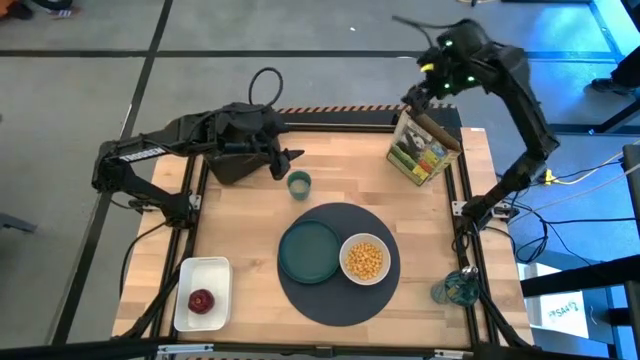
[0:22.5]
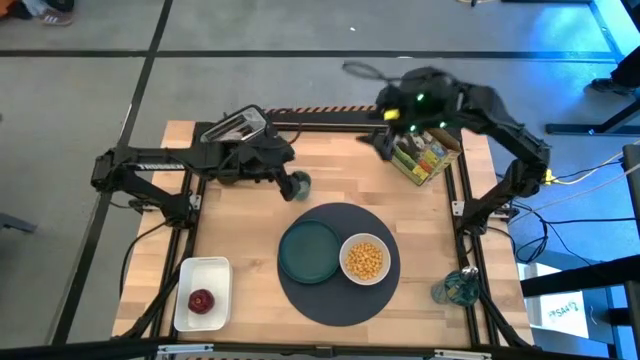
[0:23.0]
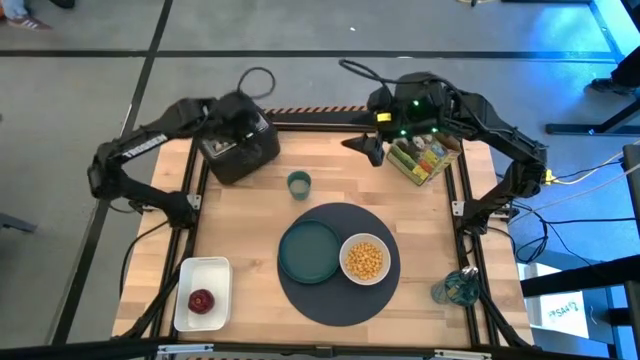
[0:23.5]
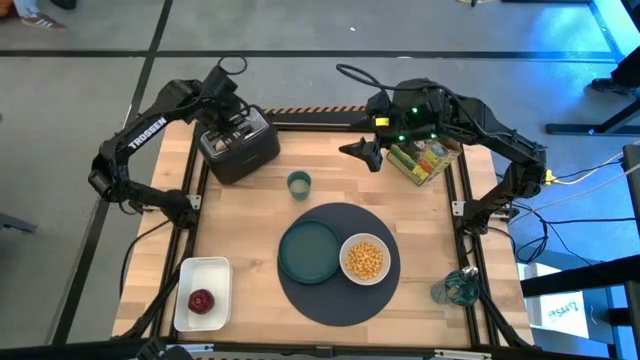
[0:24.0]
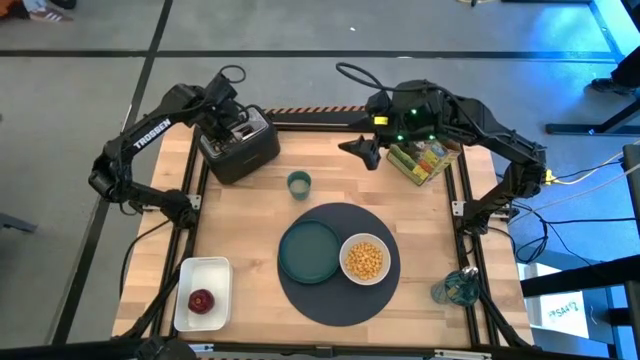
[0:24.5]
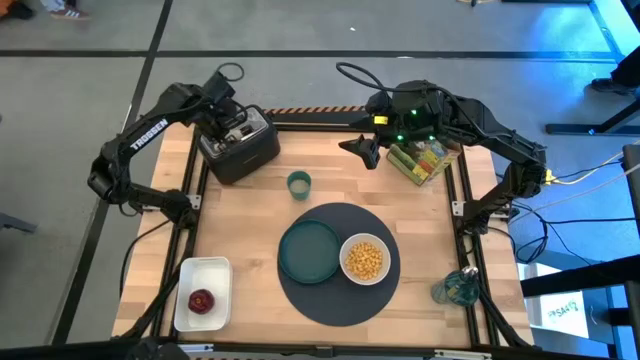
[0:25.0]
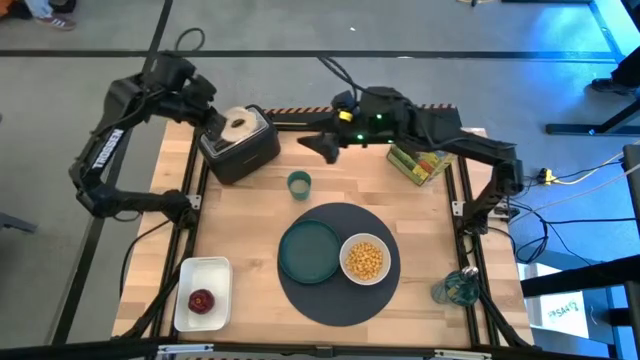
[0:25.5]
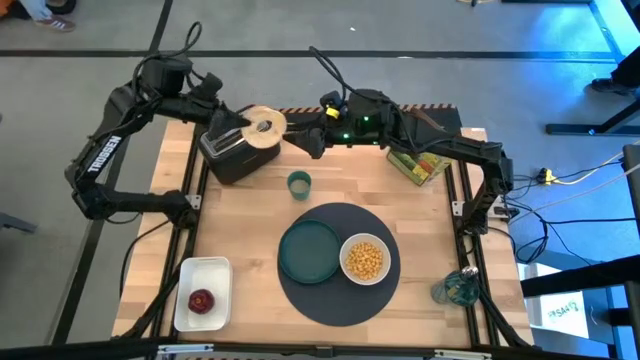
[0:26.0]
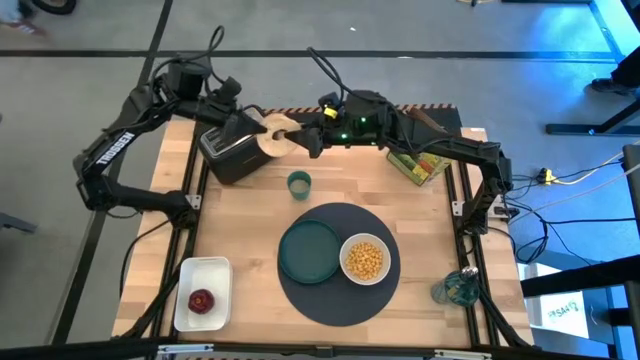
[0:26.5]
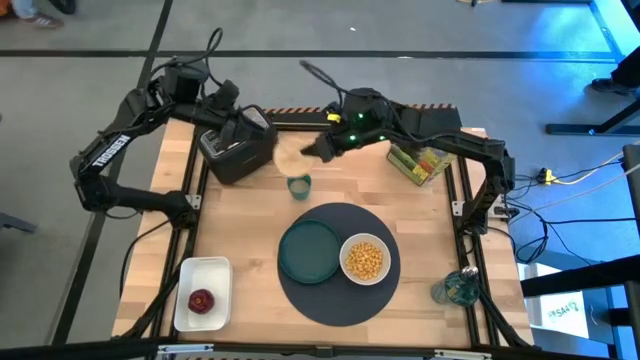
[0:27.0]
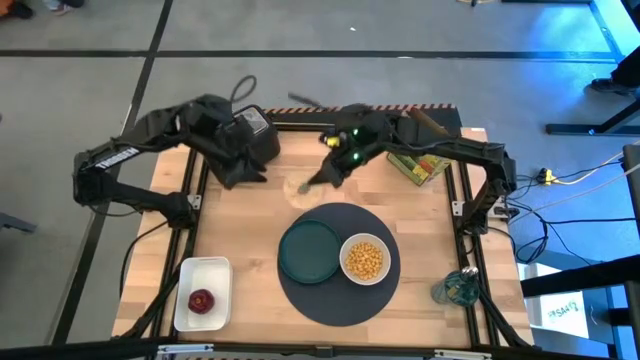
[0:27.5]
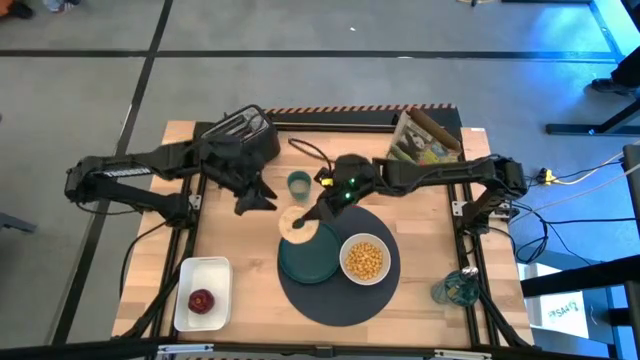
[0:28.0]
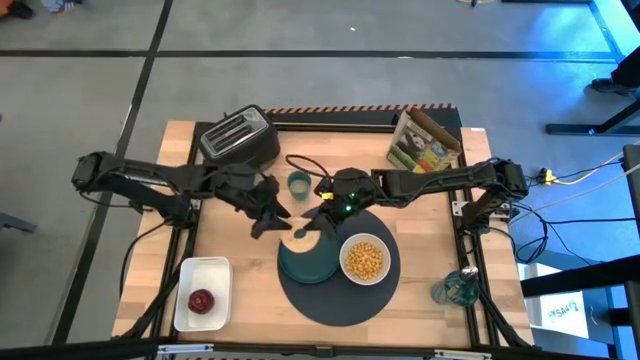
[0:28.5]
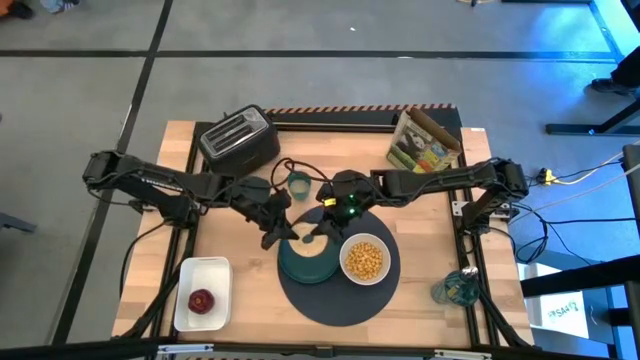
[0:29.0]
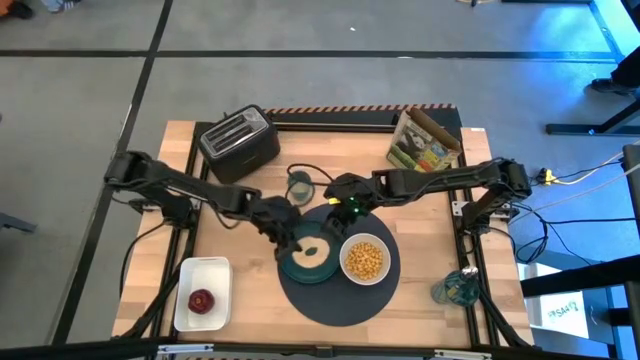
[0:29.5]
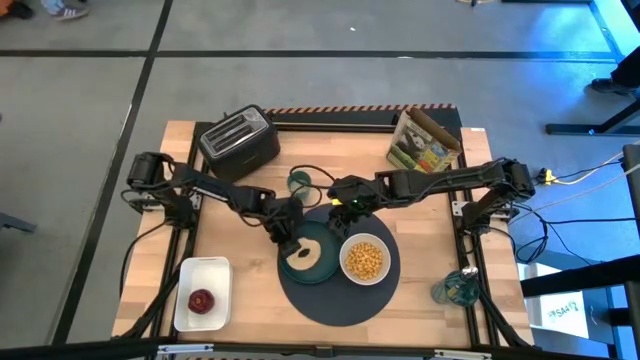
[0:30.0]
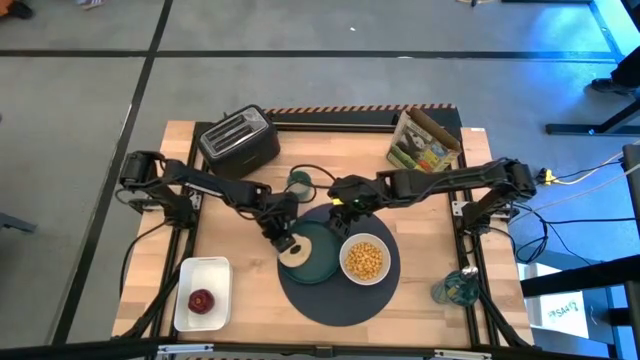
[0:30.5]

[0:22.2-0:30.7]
Task: Arrange a breakfast setting
Put the bagel from the toaster onto the green plate

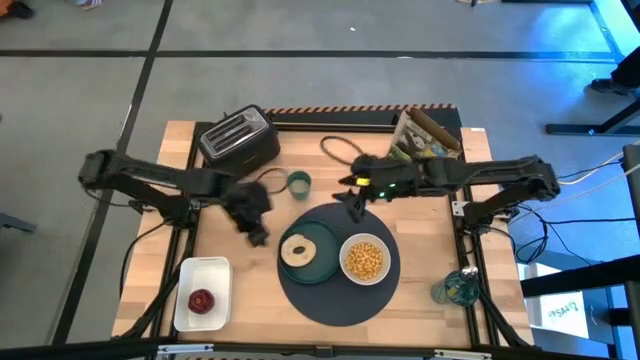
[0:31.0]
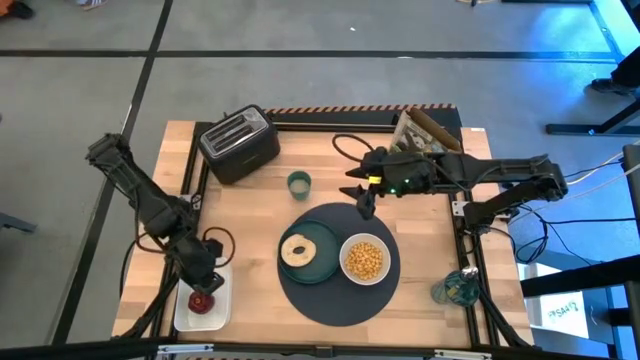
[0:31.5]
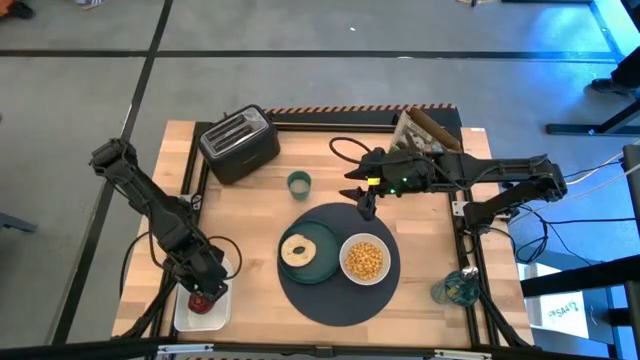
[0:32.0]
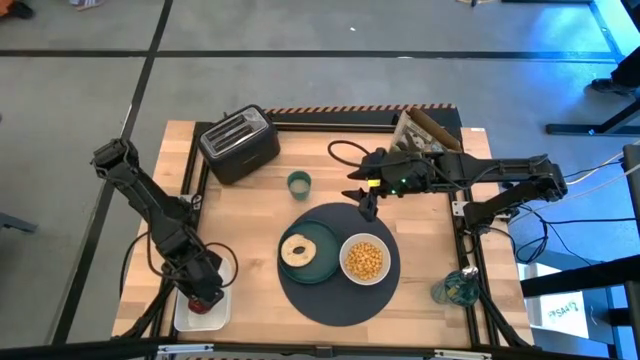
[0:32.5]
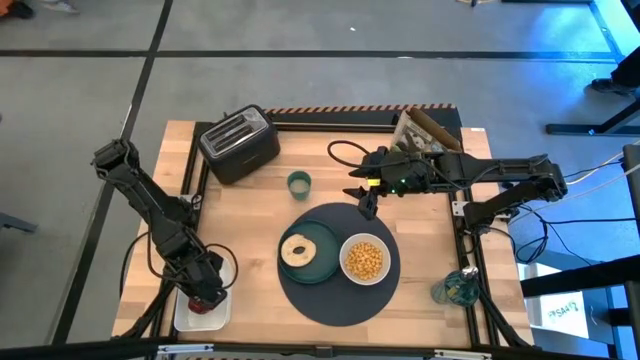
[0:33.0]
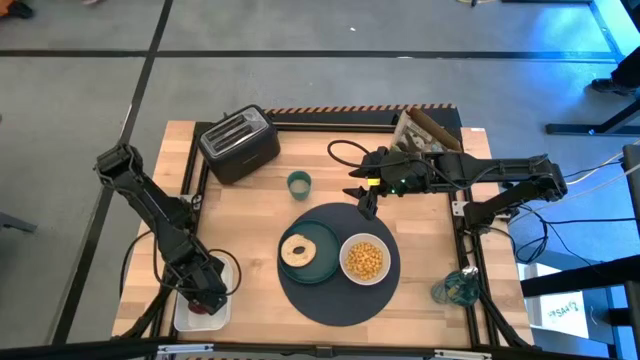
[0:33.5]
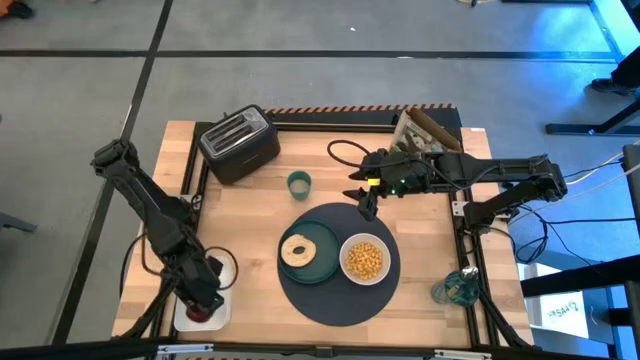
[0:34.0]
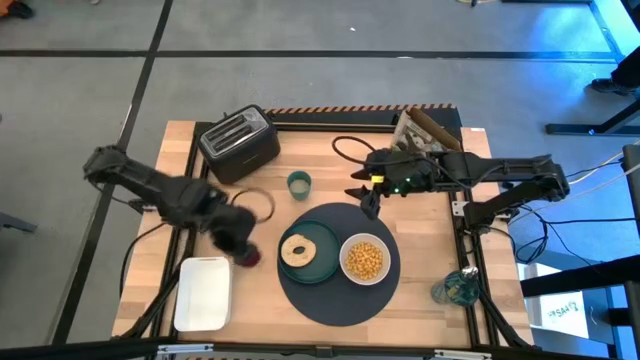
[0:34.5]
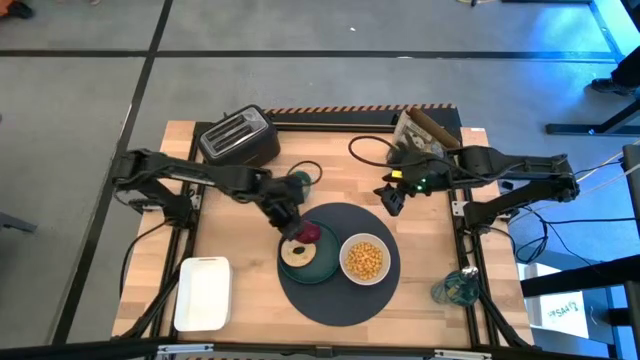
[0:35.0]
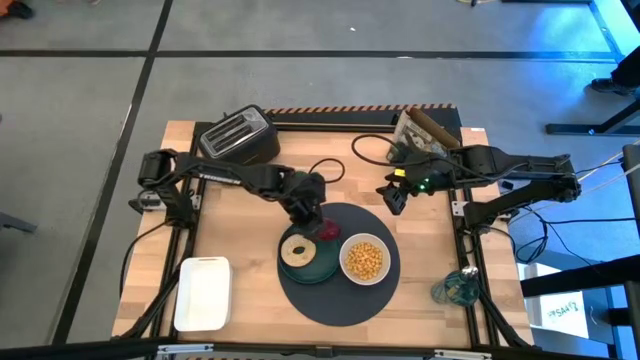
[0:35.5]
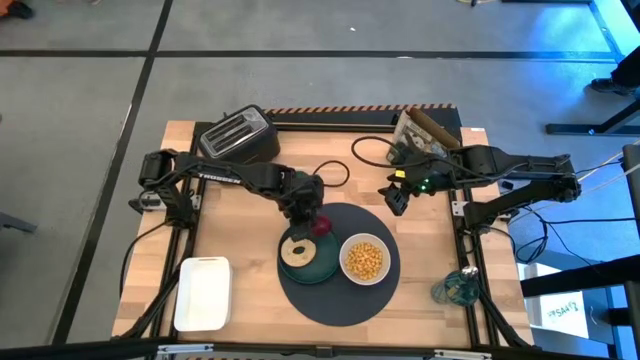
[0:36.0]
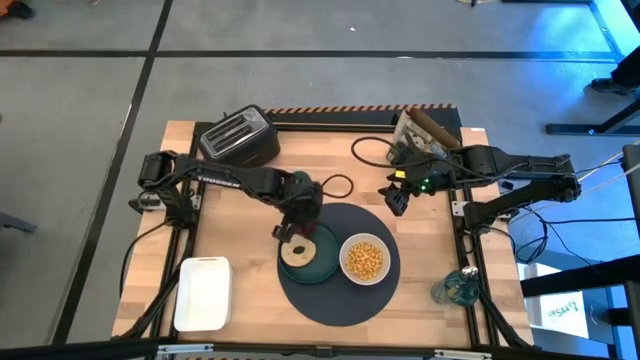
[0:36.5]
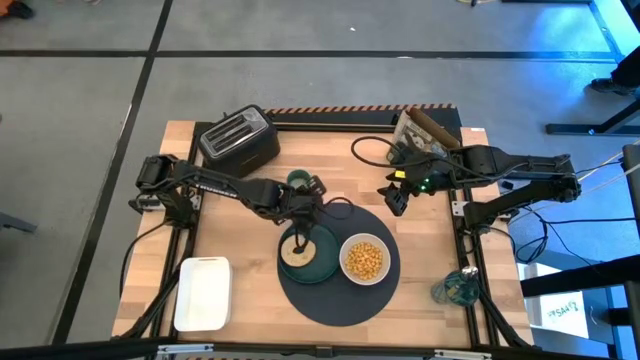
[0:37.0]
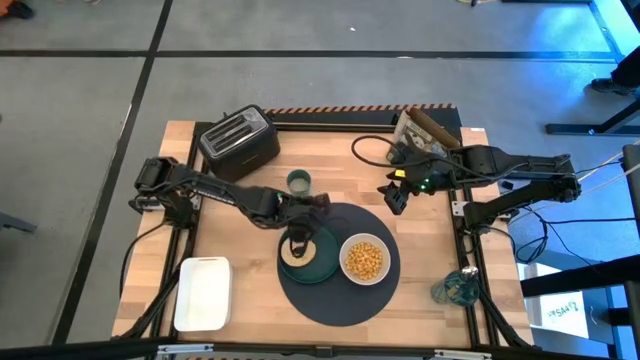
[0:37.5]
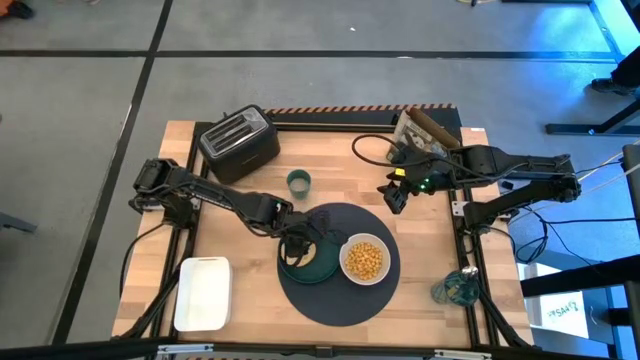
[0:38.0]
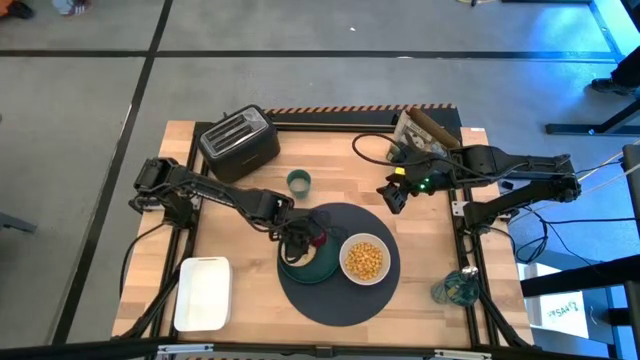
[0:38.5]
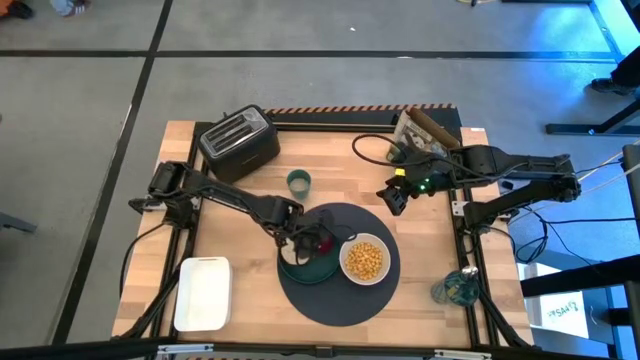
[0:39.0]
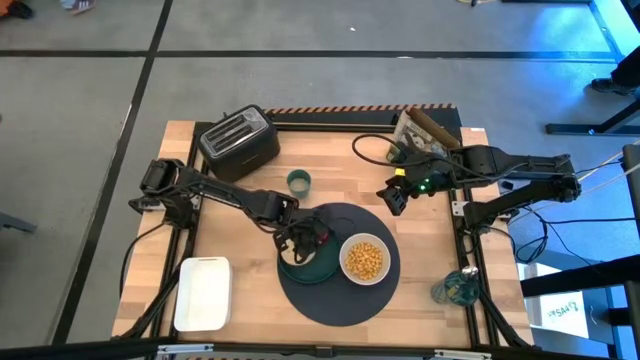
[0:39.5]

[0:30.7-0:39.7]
Put the red apple on the green plate

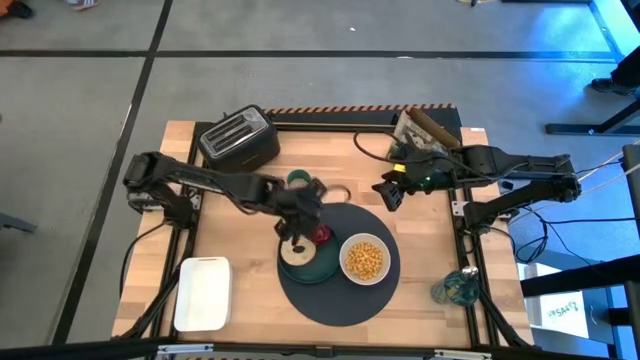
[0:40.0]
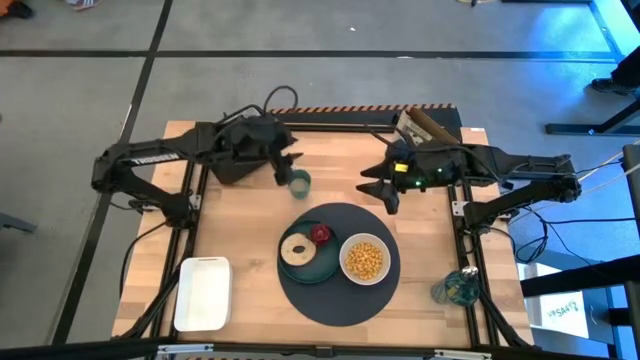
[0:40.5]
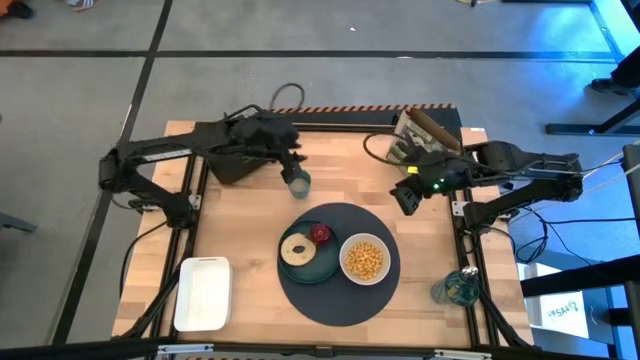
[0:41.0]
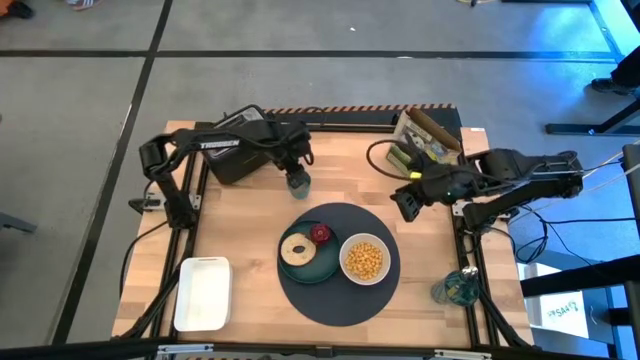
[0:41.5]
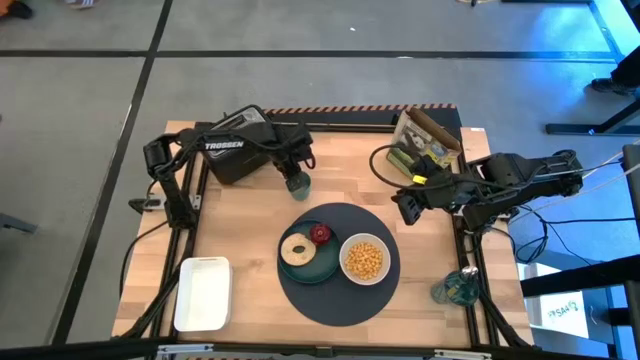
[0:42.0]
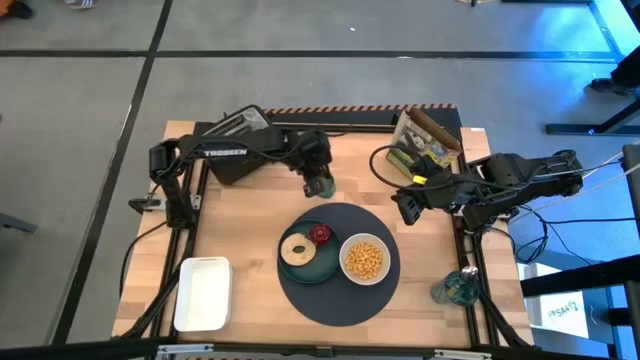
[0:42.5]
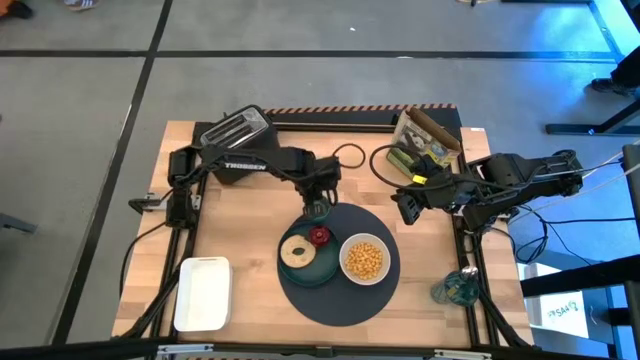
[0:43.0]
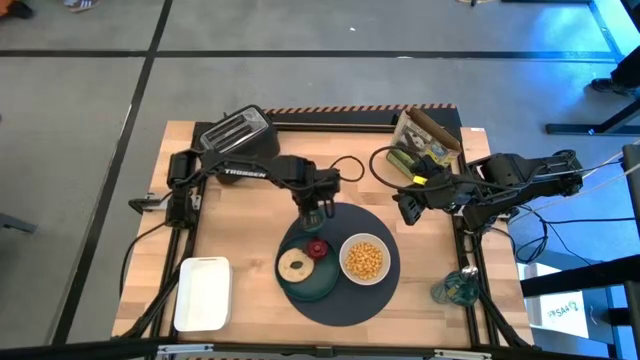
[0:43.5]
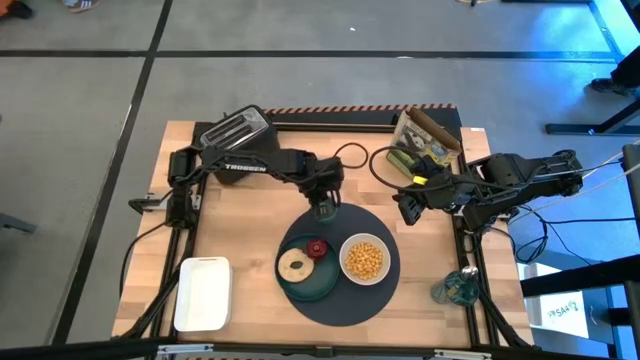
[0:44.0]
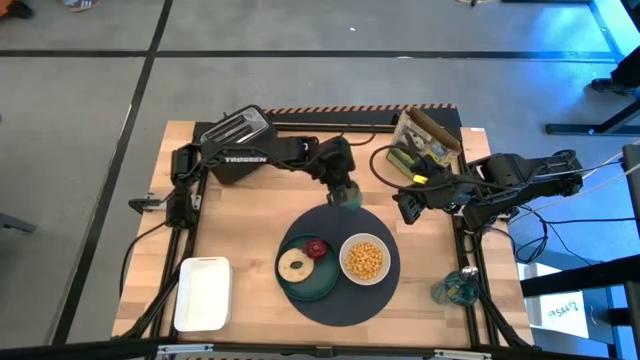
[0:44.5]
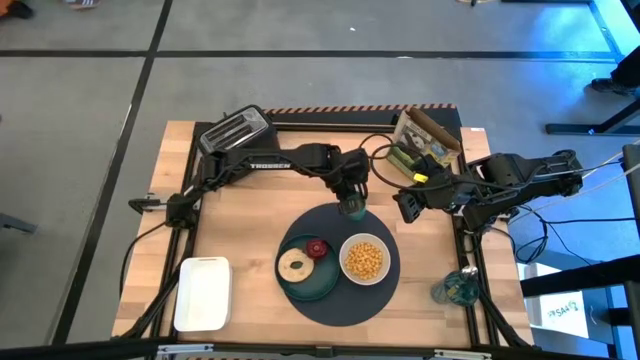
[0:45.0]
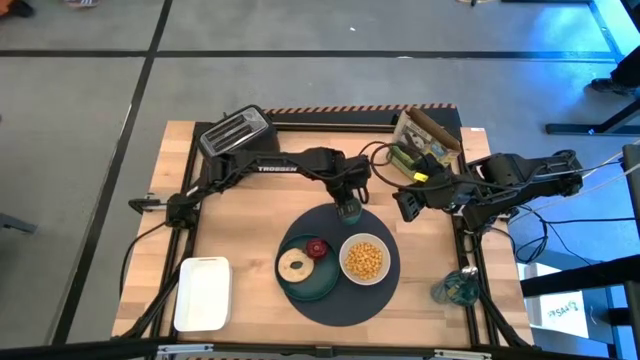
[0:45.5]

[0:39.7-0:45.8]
Put the blue glass on the dark blue placemat to the top of the white bowl
